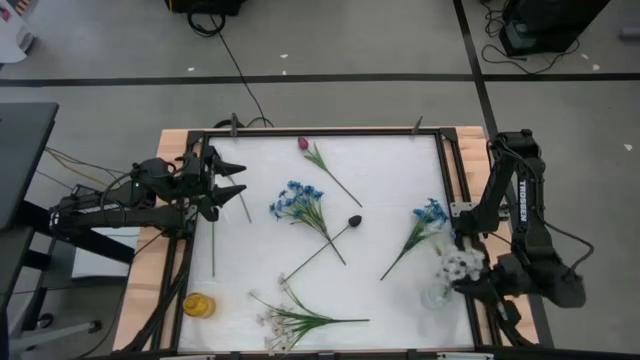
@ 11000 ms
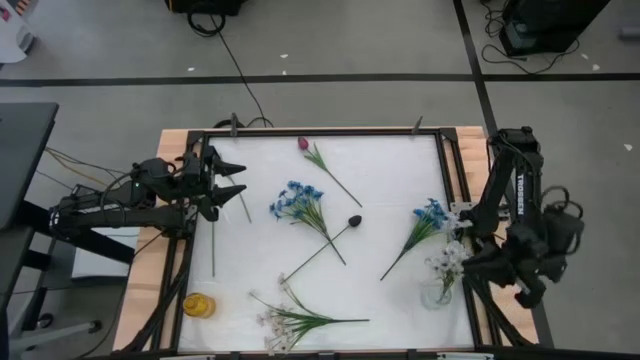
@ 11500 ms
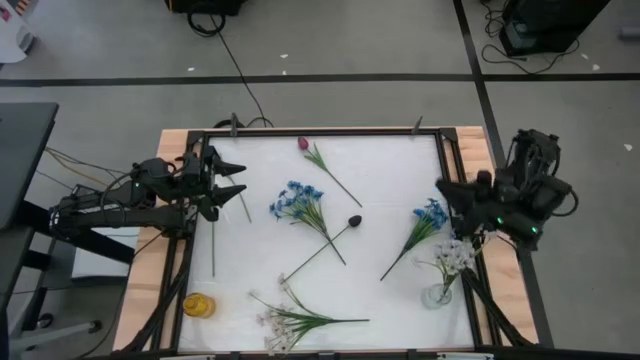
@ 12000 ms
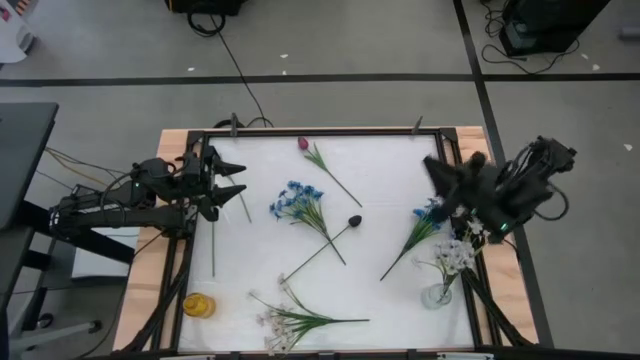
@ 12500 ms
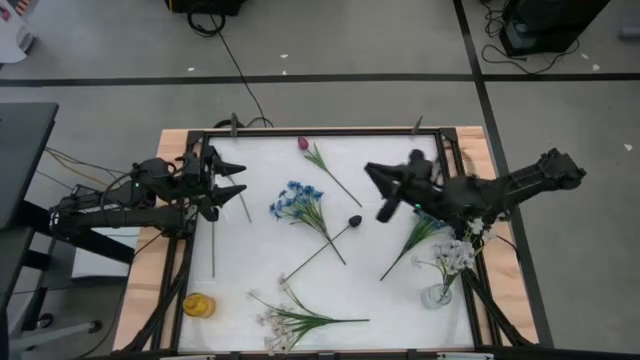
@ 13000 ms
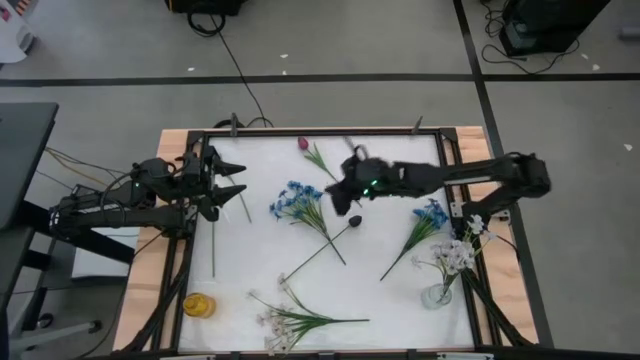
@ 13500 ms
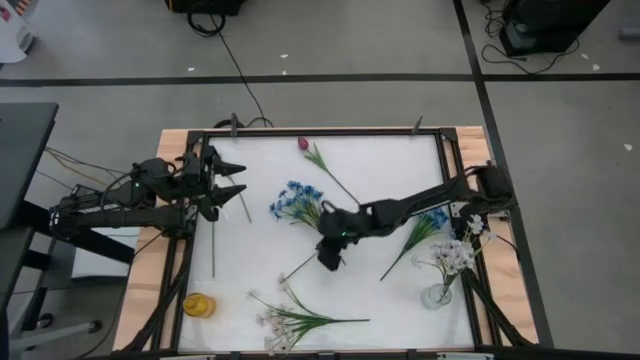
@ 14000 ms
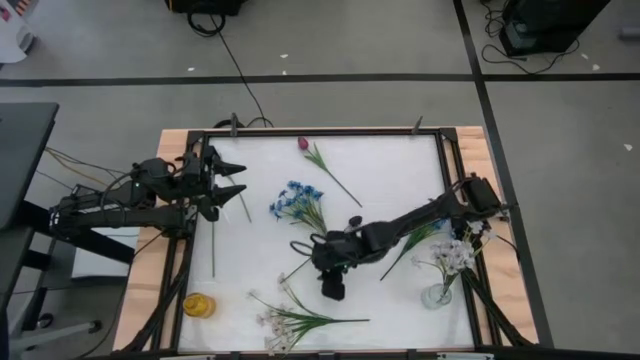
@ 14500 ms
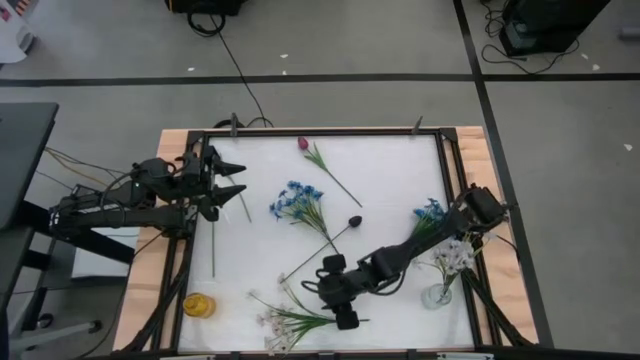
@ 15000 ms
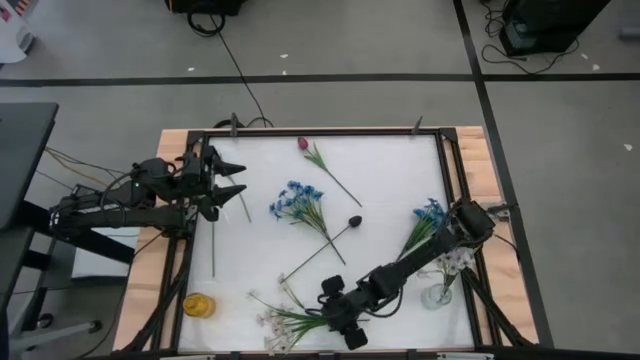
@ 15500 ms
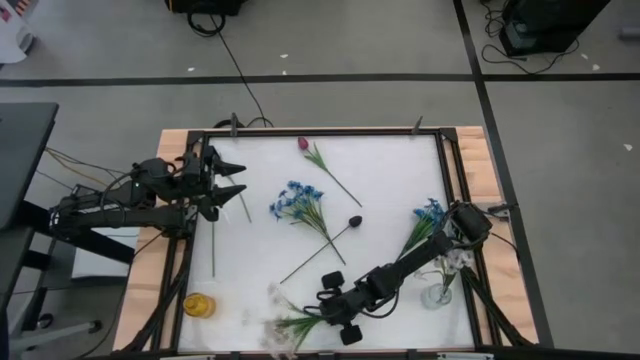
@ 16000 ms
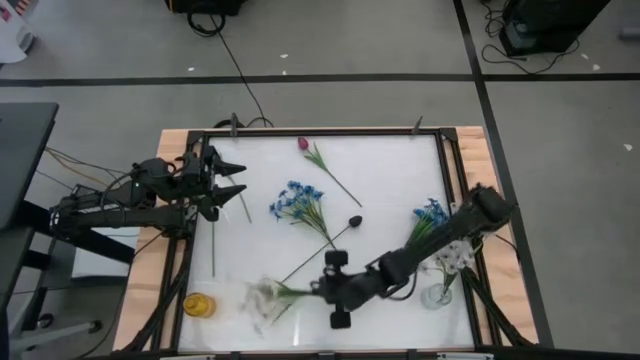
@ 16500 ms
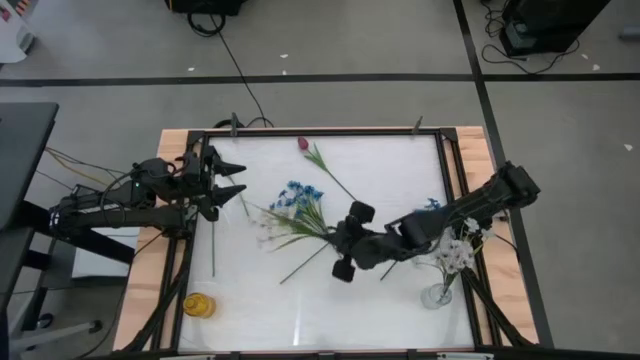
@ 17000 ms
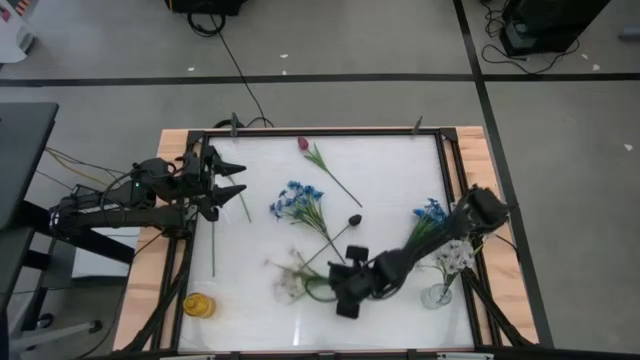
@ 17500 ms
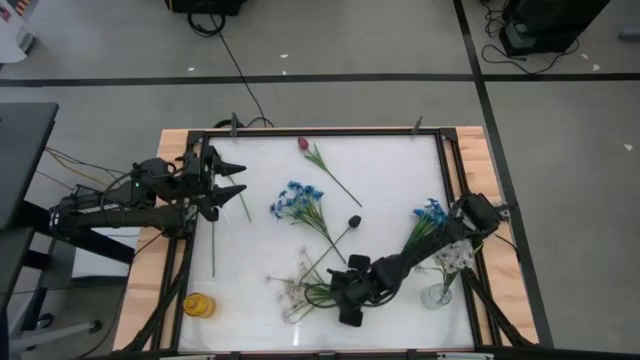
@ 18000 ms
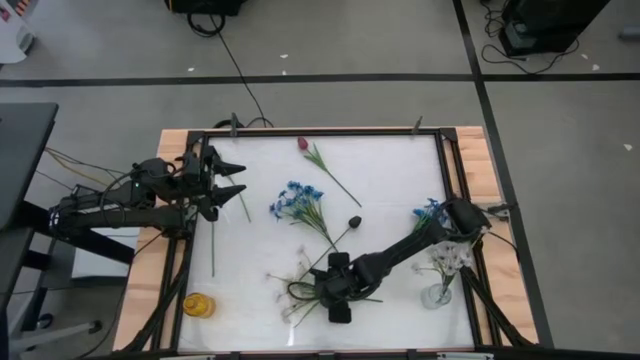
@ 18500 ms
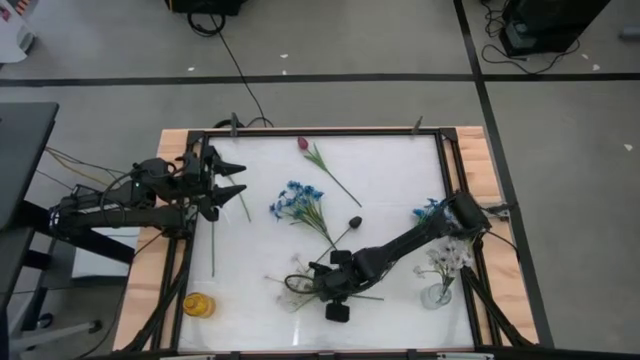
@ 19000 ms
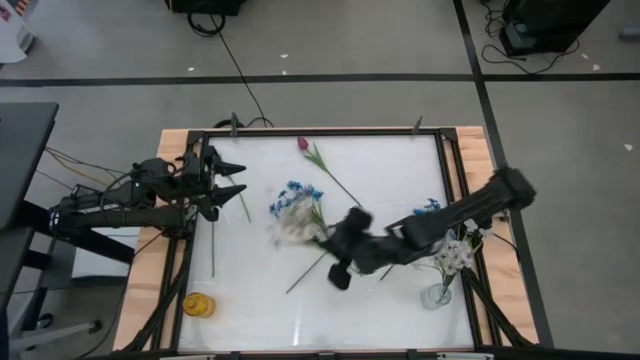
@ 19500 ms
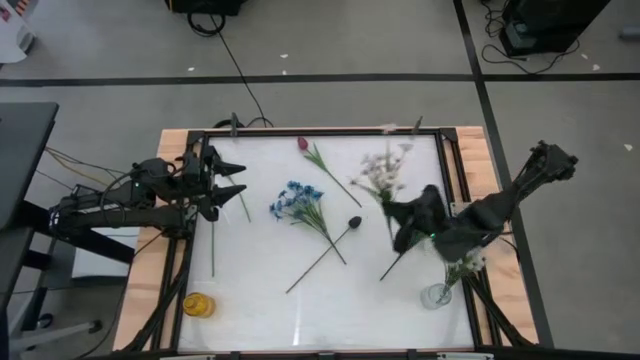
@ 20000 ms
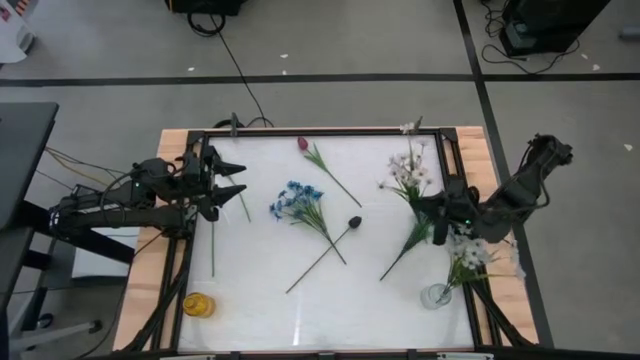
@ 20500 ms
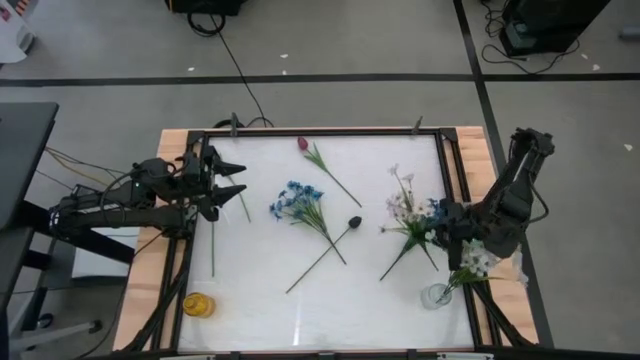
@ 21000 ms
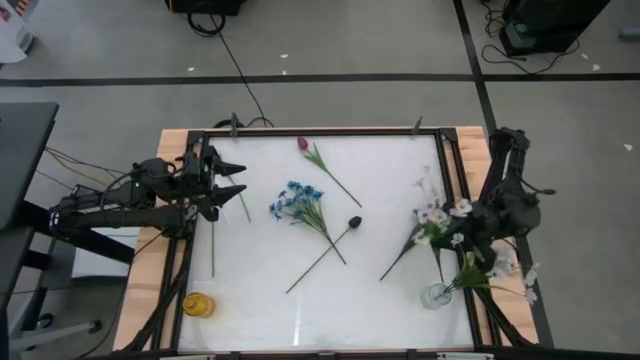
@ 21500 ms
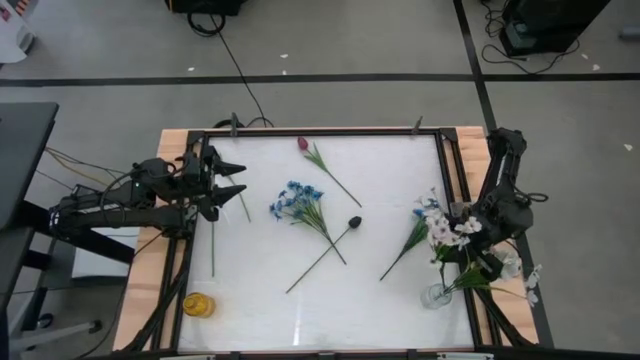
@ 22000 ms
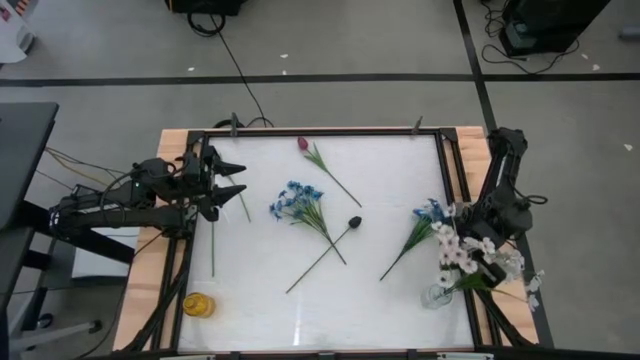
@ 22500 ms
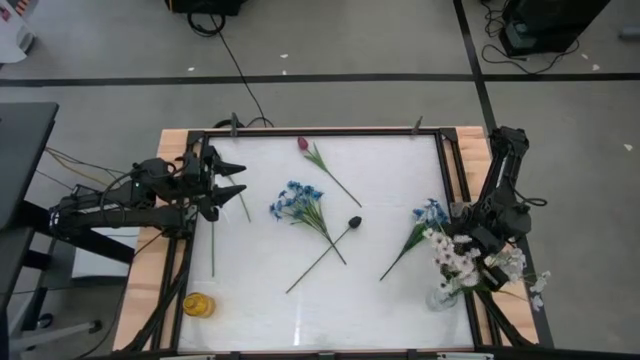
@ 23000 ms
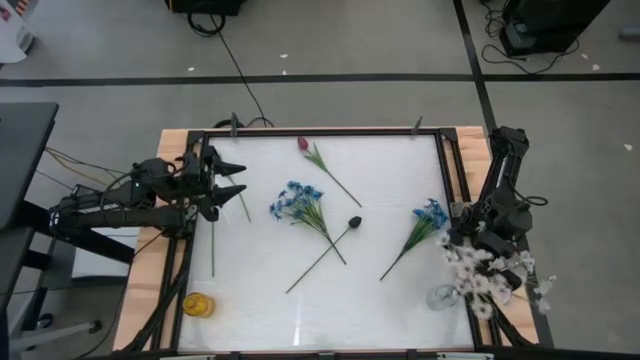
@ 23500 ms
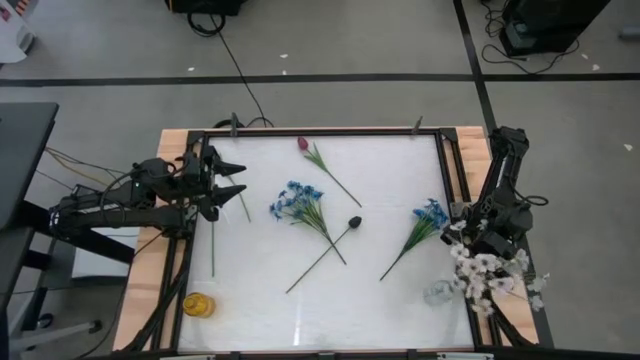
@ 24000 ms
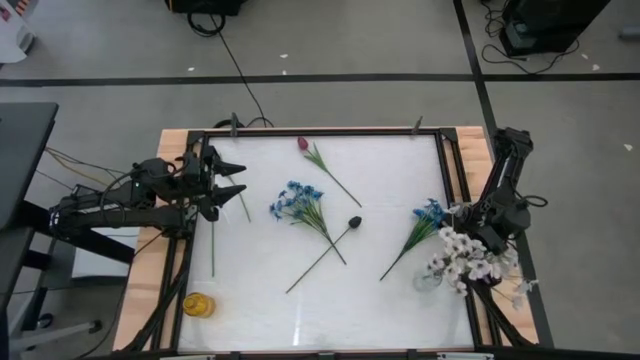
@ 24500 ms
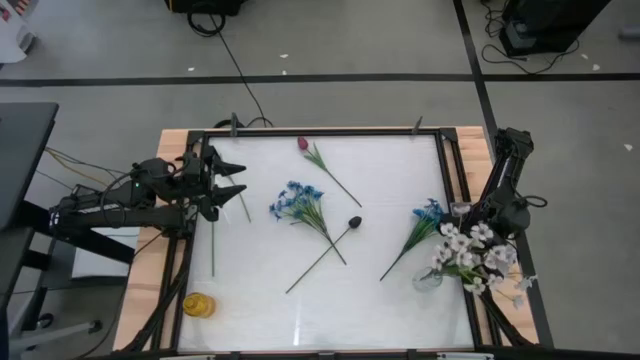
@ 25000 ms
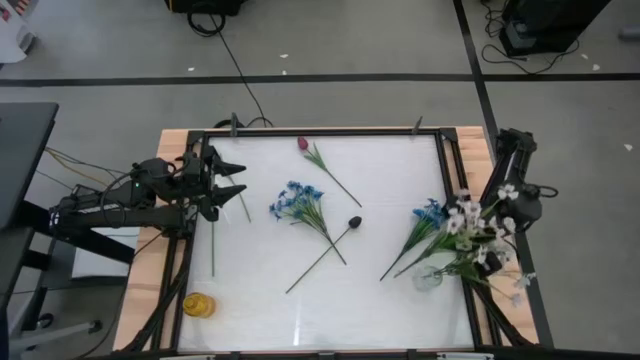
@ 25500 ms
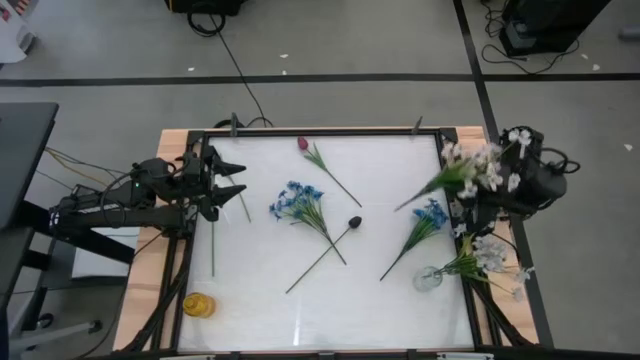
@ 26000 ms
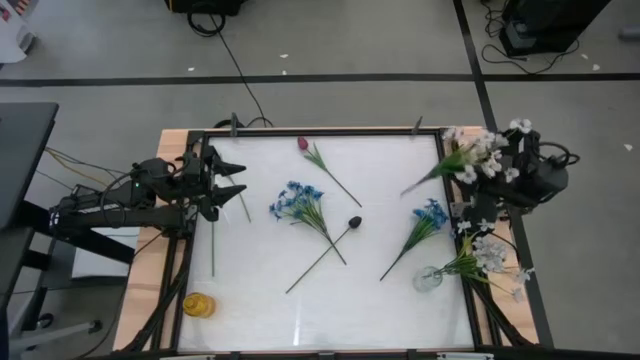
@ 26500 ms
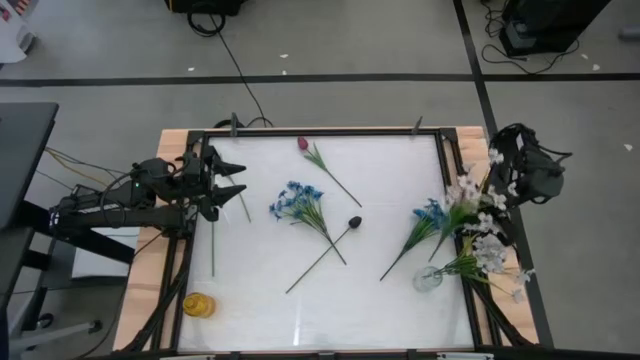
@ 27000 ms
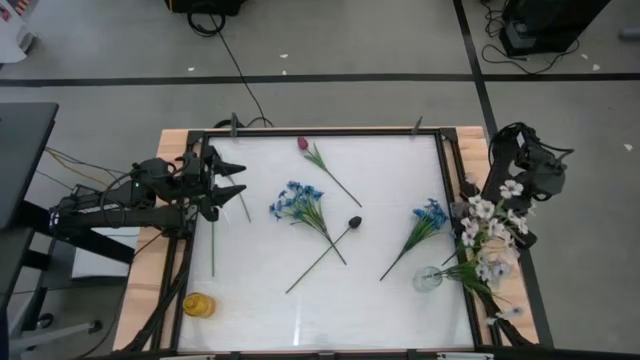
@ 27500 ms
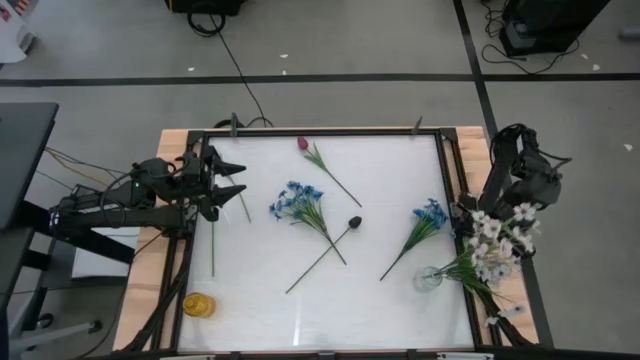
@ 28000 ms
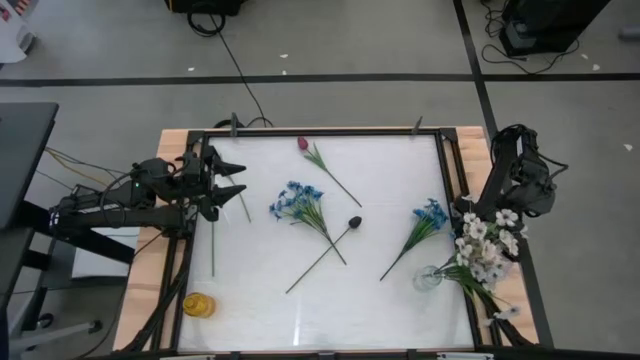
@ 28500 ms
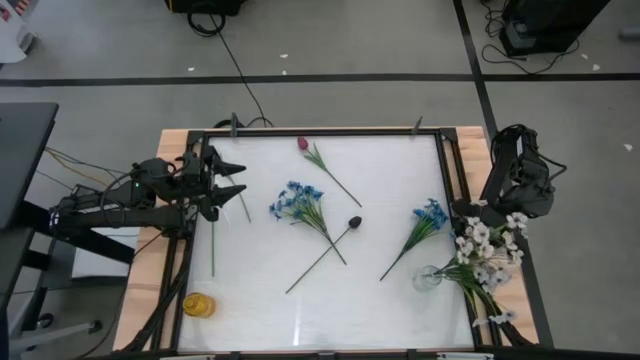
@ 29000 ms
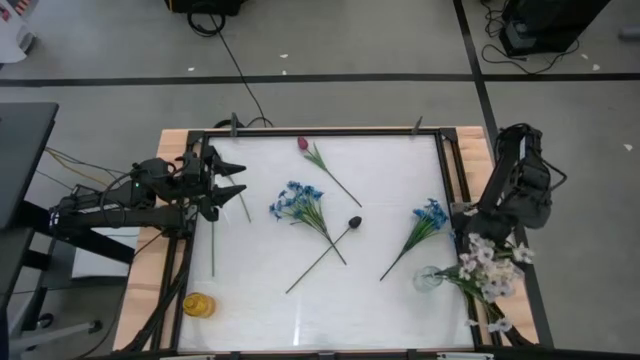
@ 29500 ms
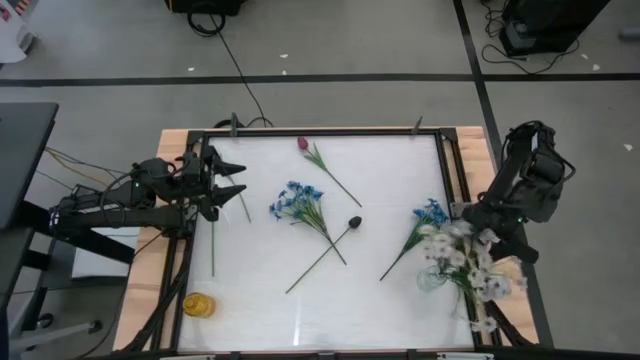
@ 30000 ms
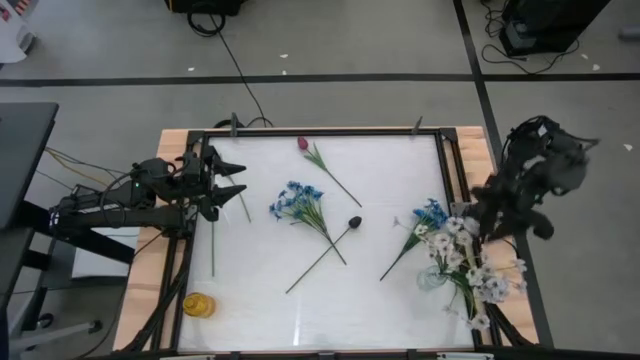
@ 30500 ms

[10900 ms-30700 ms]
Task: Sort flowers into vase by color
Put the white flowers into the transparent vase
